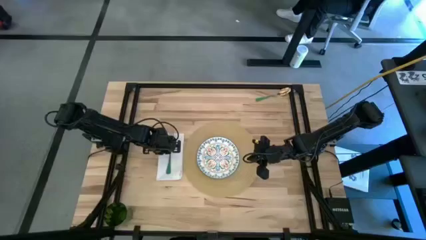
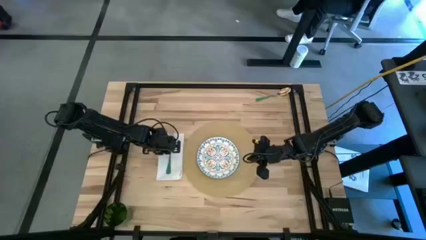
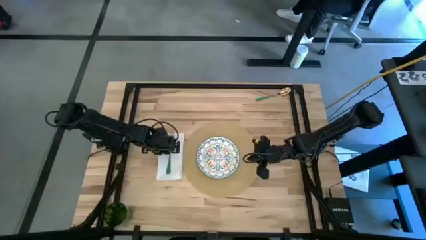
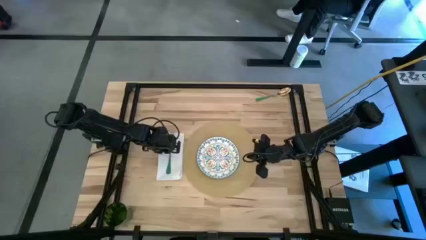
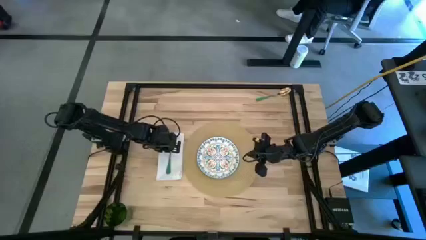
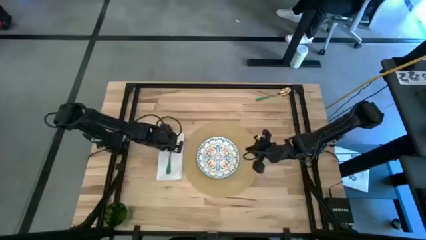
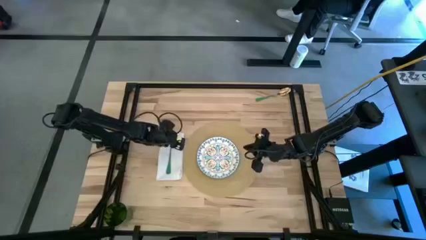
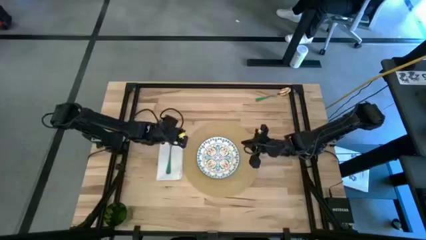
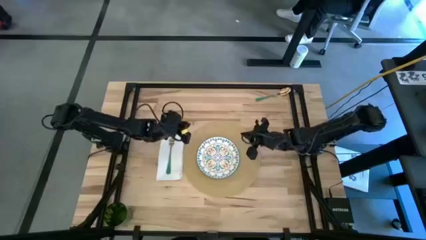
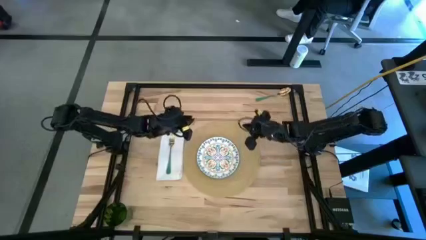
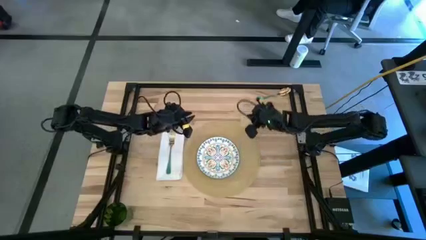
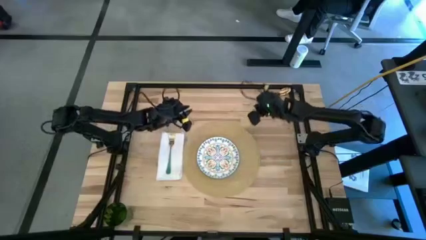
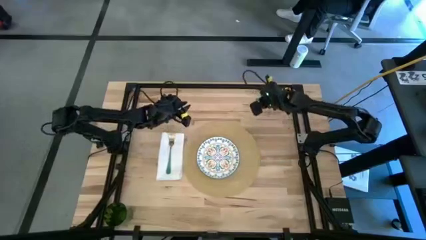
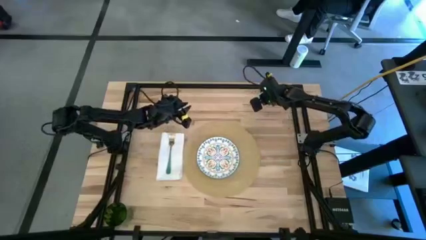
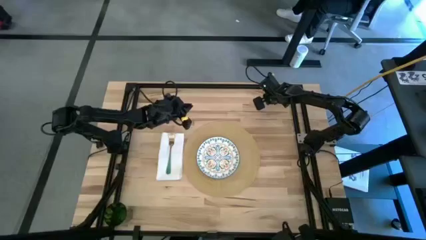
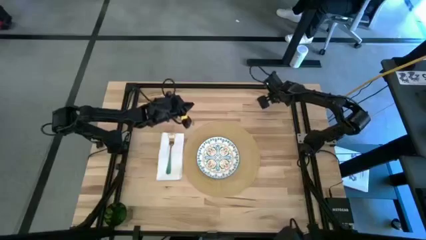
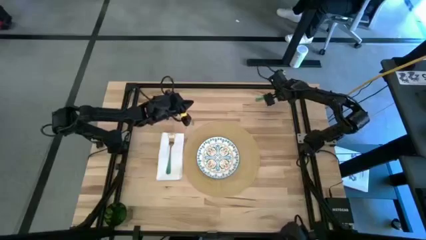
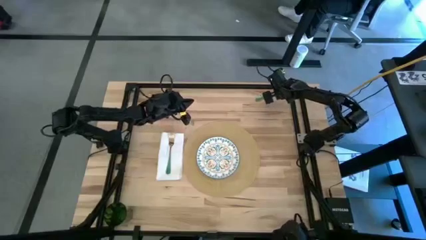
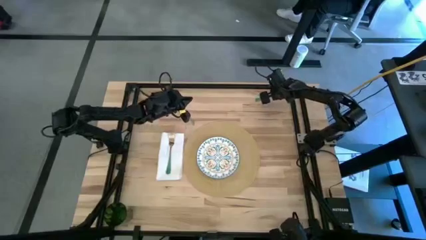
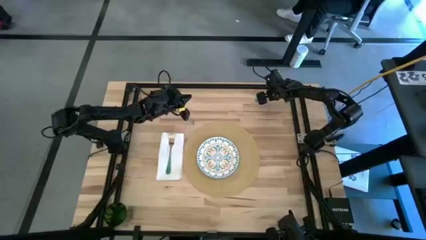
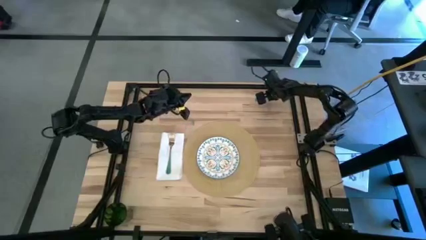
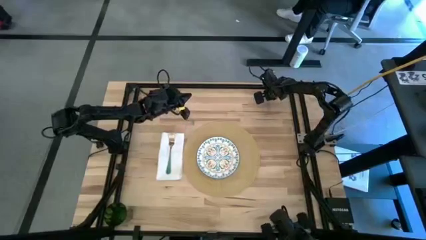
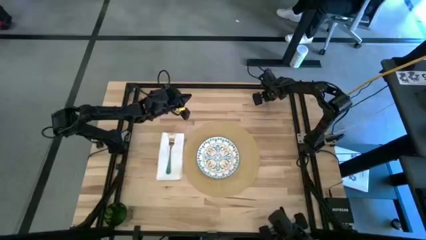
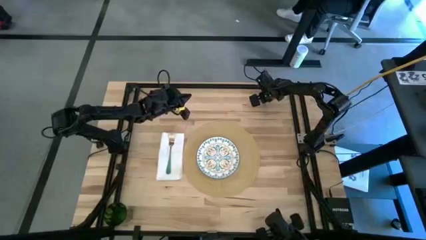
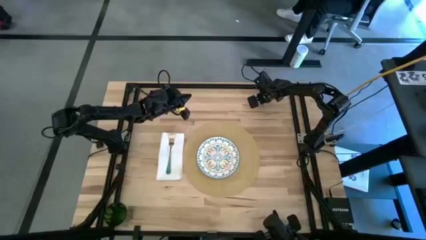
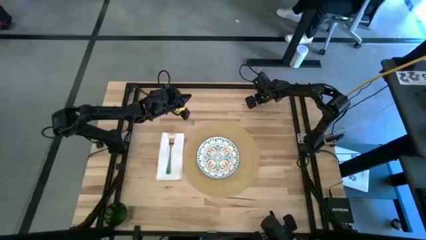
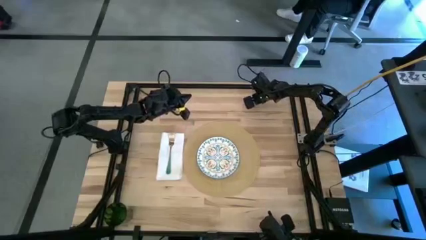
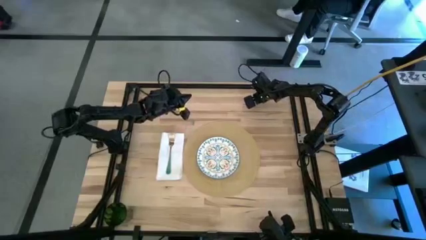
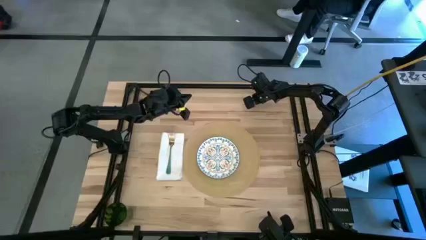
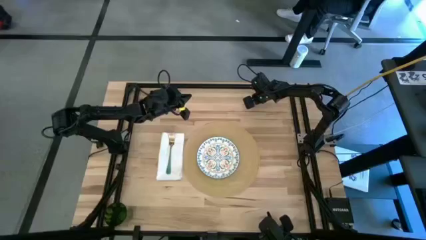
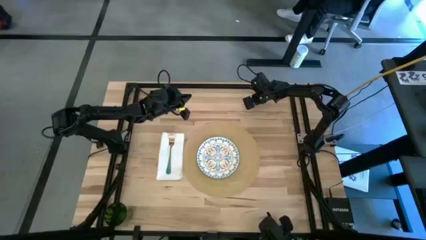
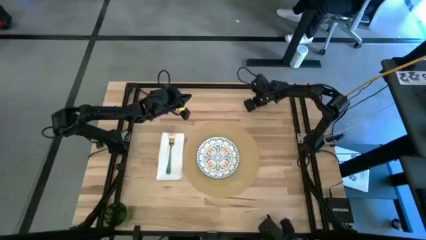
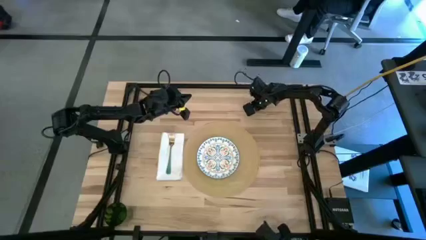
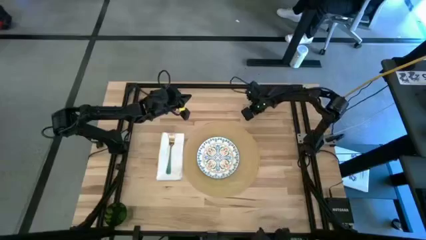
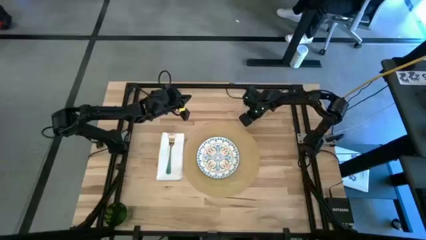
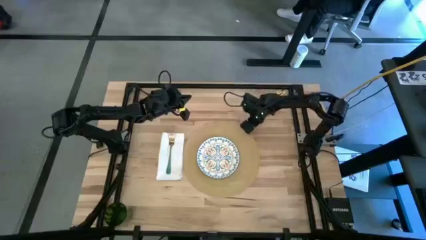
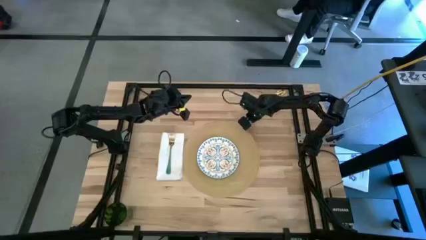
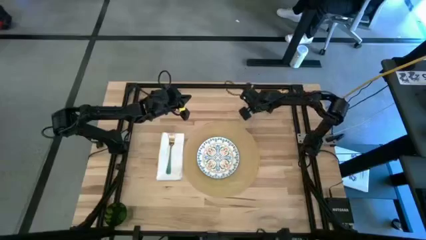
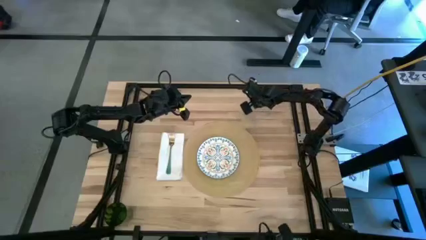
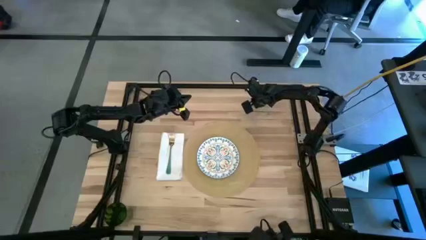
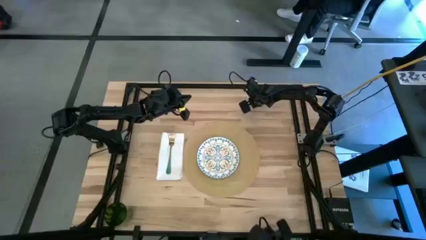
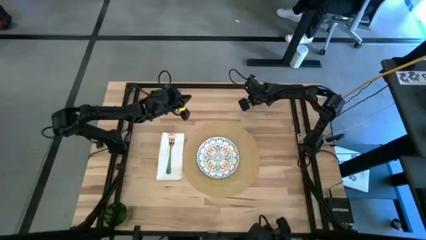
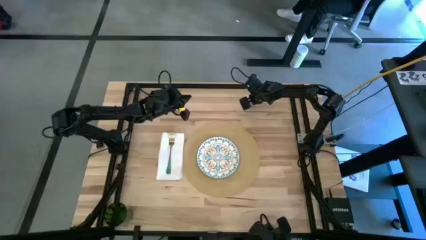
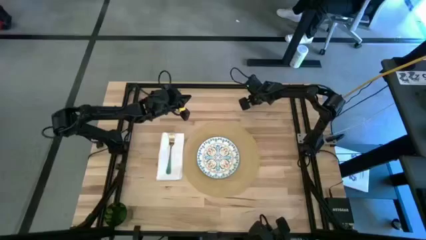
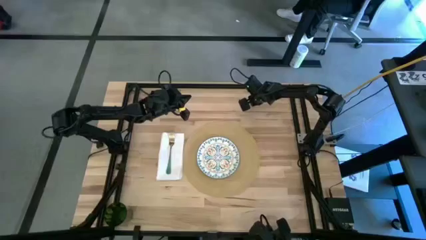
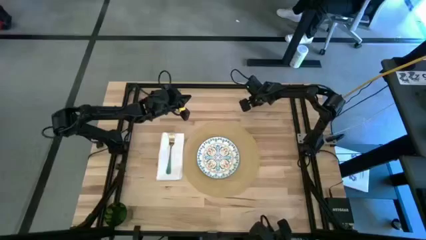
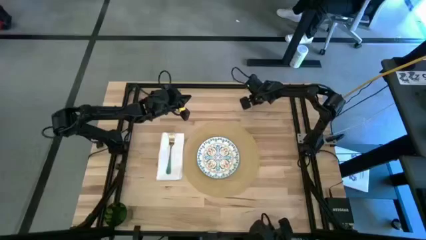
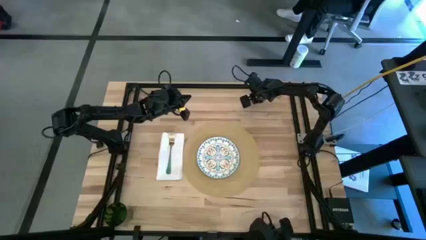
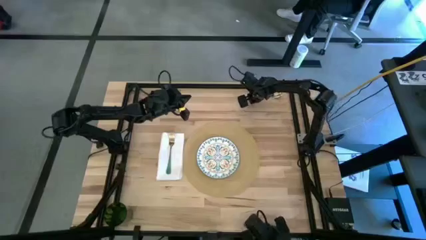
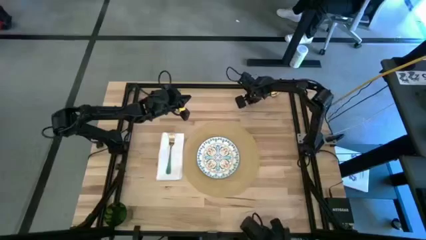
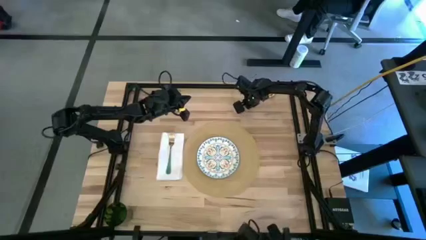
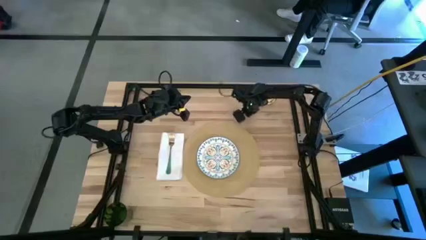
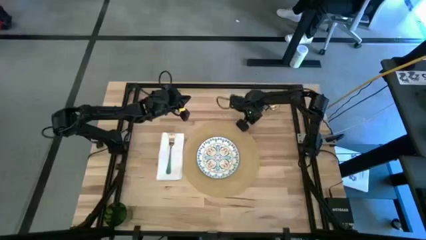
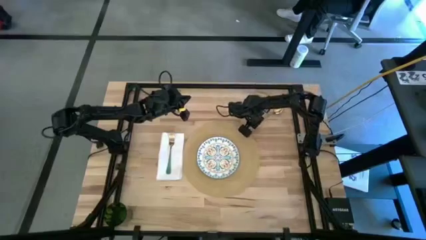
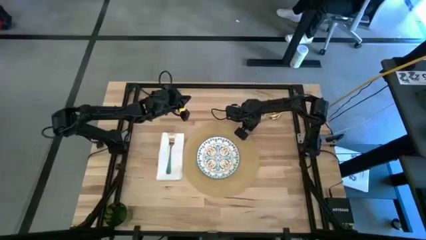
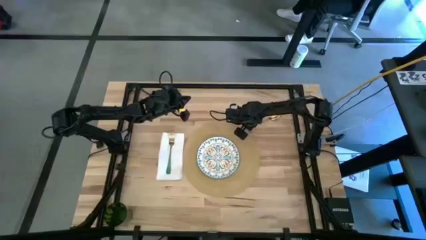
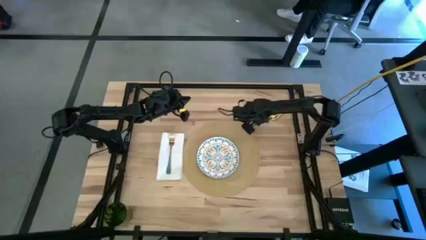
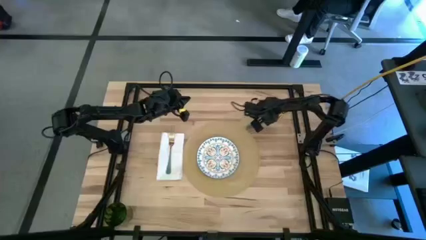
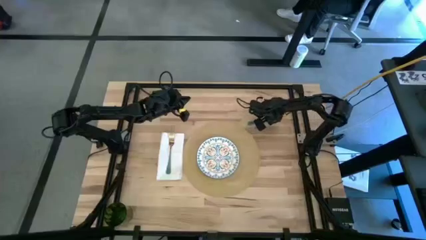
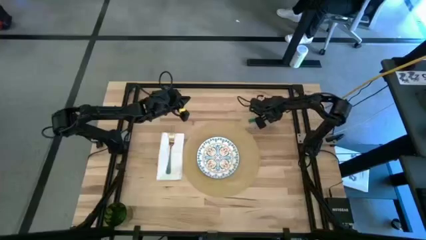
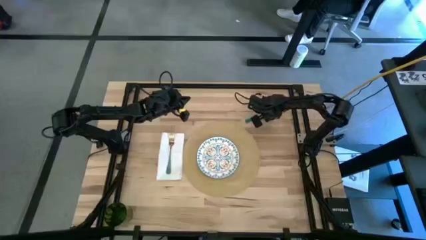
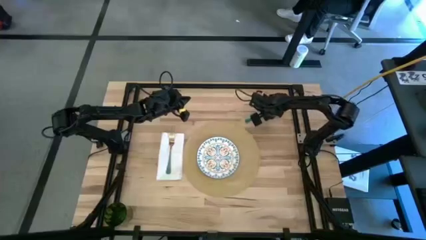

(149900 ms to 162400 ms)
Task: Set table place
Put the green spoon to the right of the blue patterned plate on the brown place mat

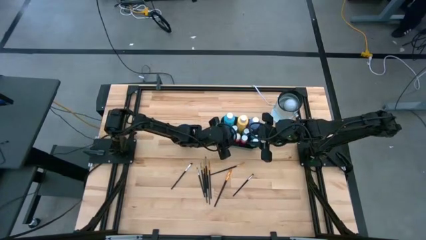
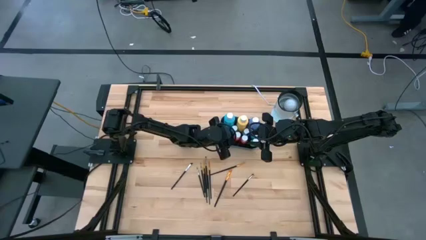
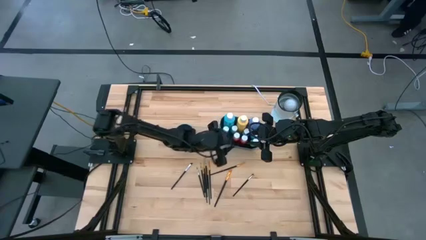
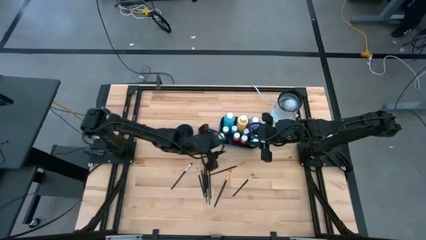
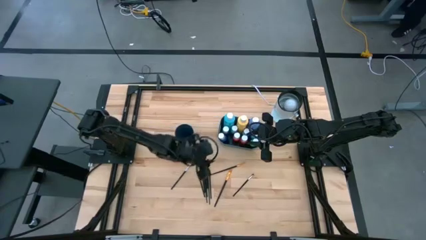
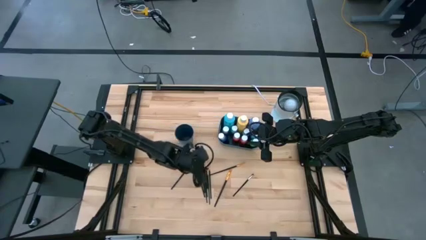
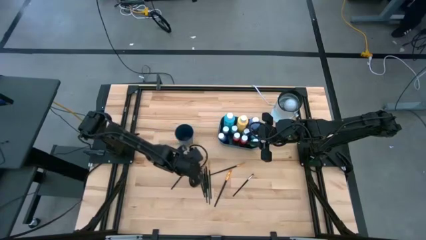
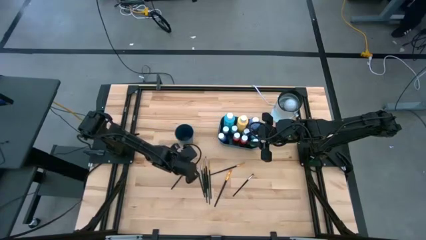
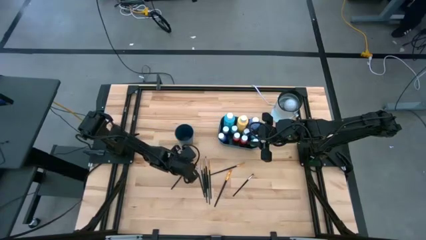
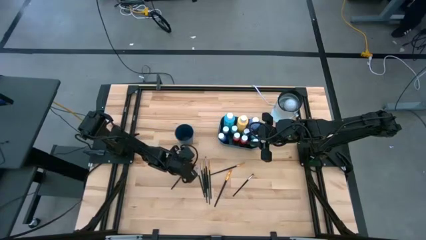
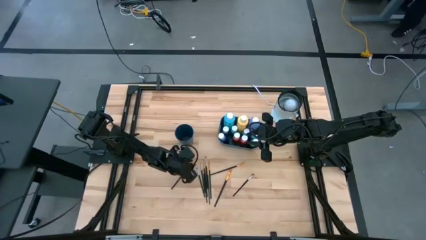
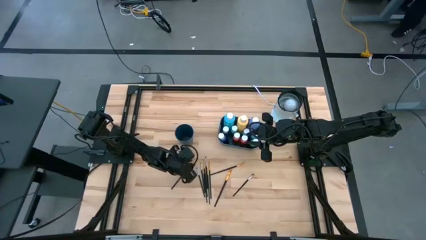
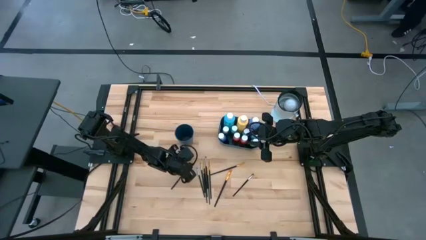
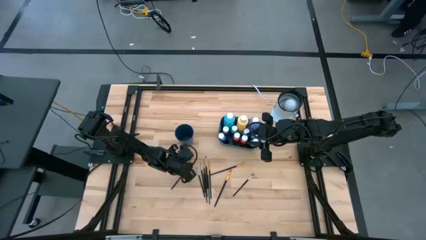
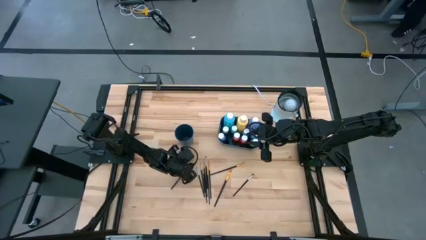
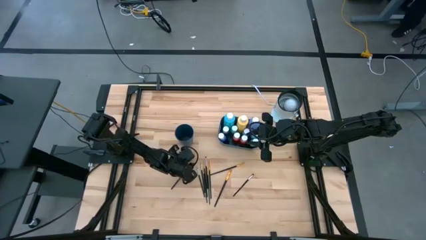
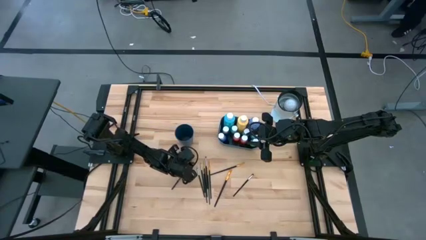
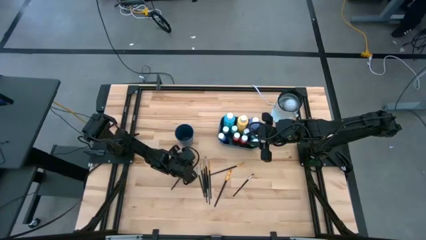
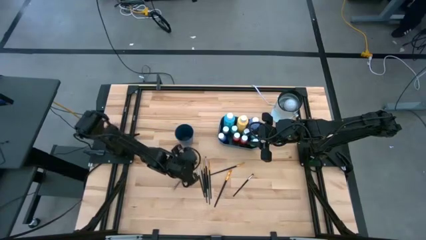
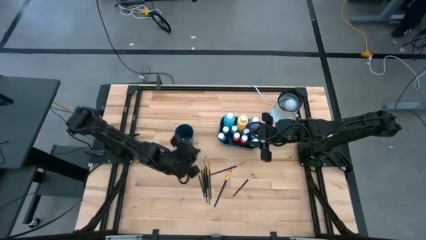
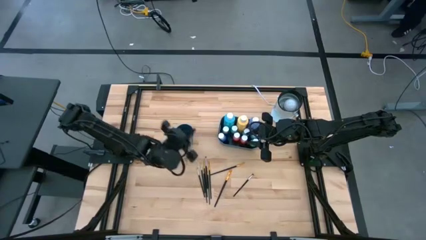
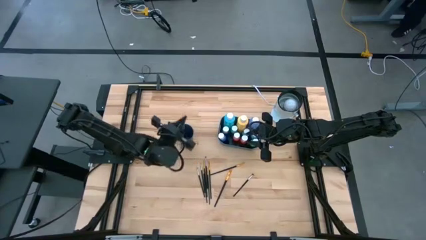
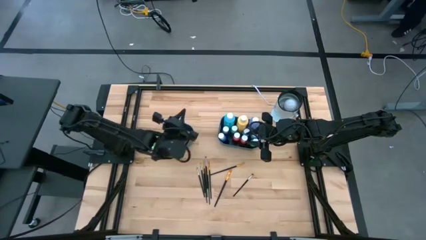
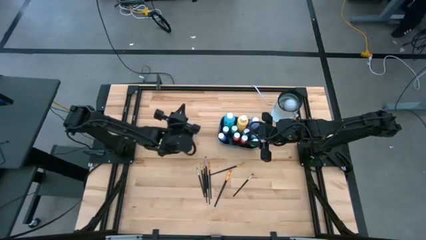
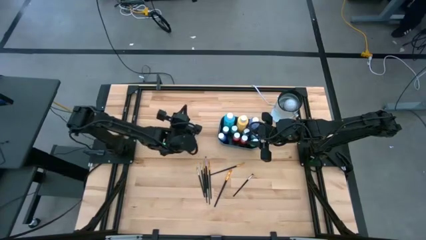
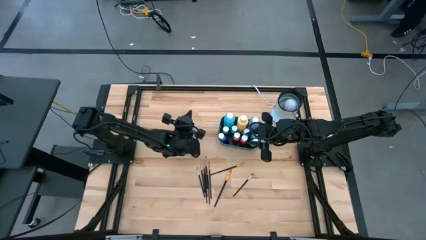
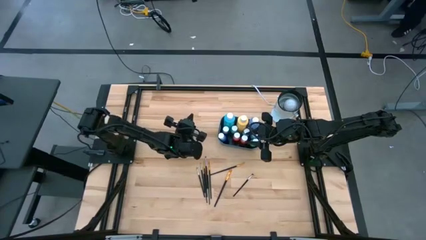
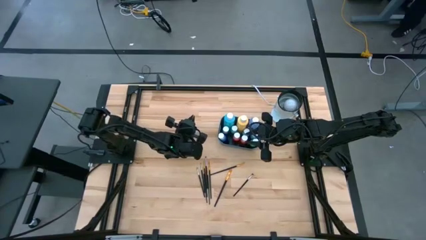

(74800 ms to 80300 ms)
Task: Pick & Place Paint Supplies
Put the silver paintbrush into the blue cup
